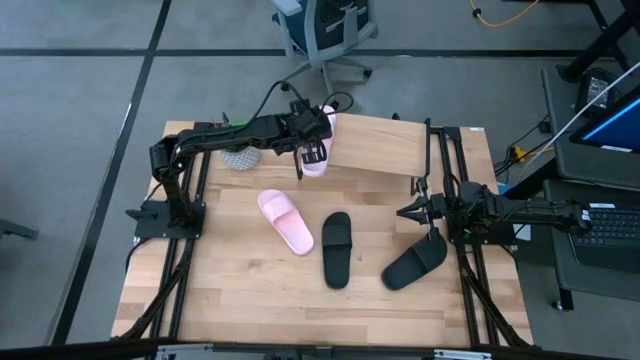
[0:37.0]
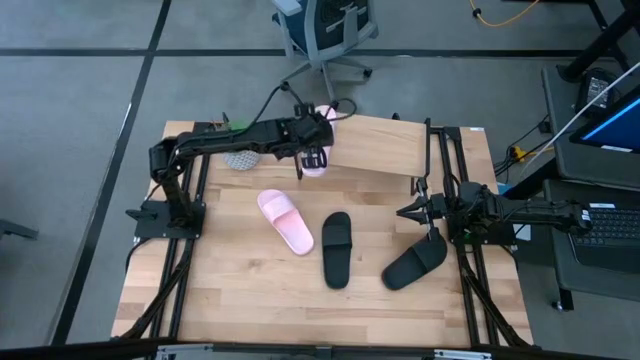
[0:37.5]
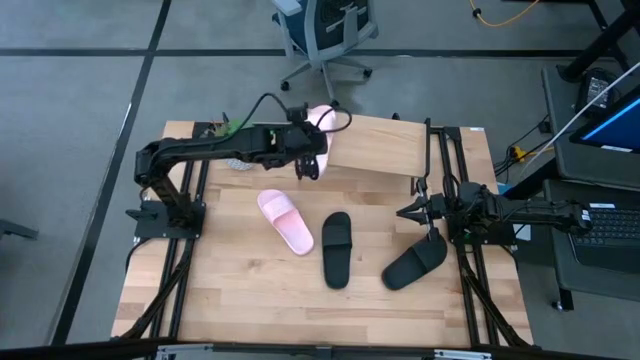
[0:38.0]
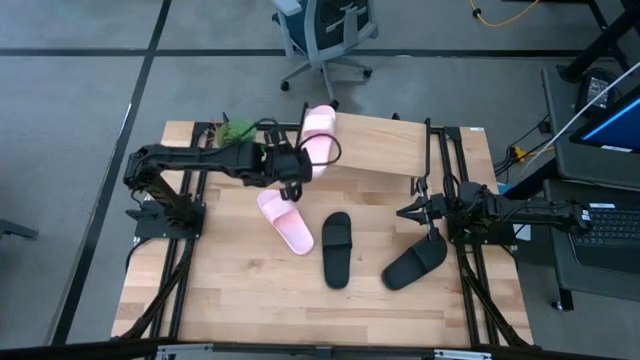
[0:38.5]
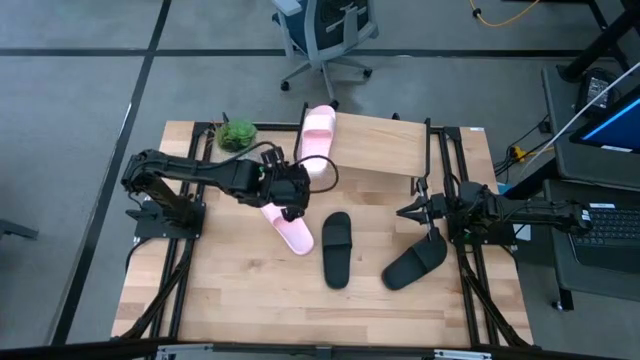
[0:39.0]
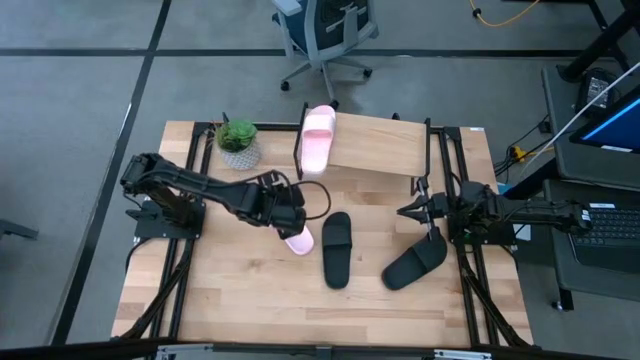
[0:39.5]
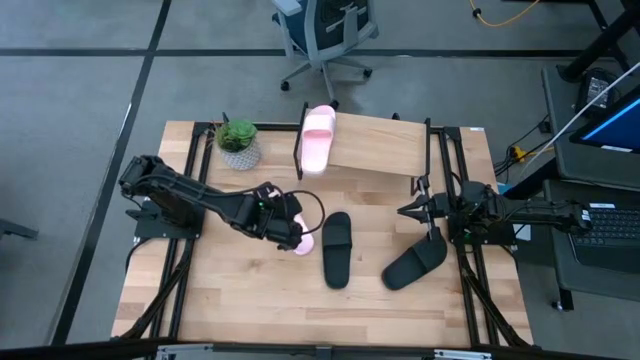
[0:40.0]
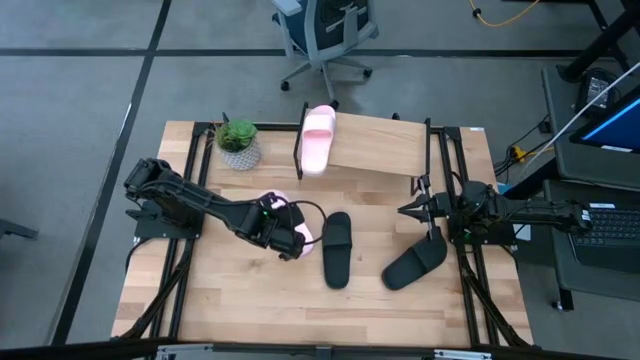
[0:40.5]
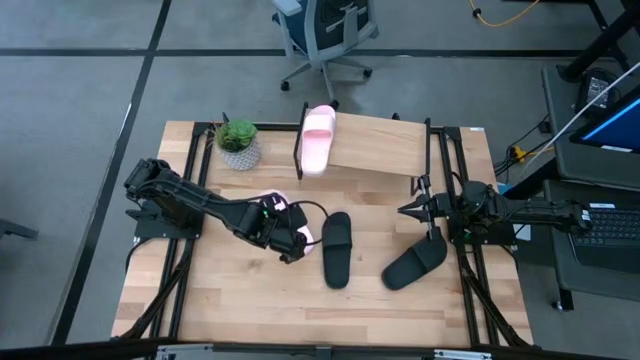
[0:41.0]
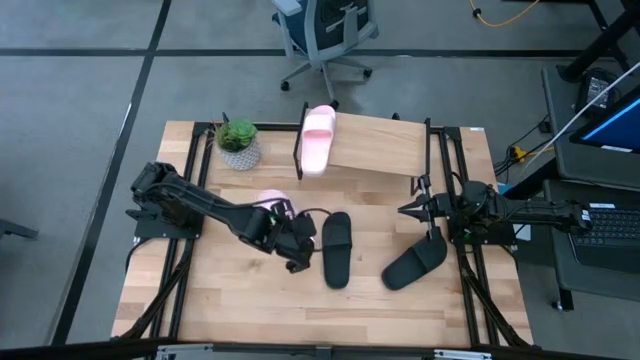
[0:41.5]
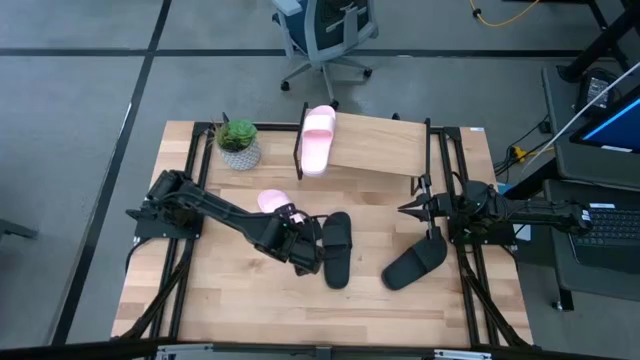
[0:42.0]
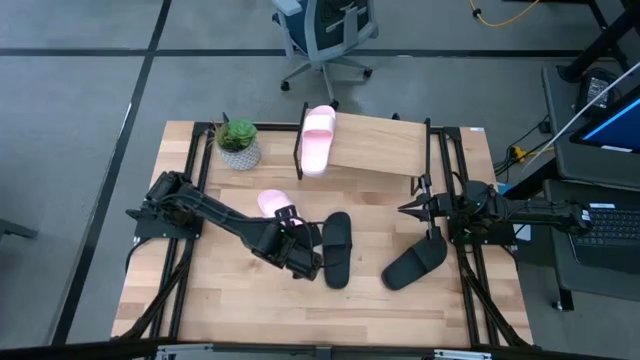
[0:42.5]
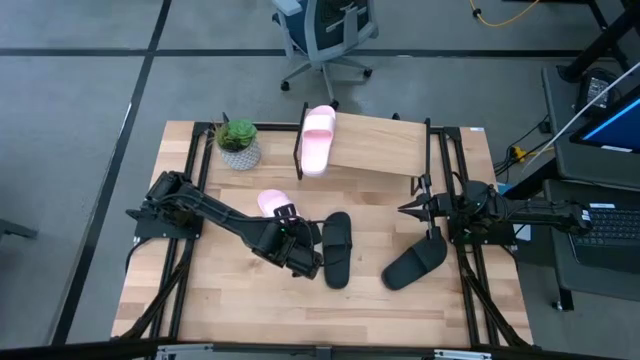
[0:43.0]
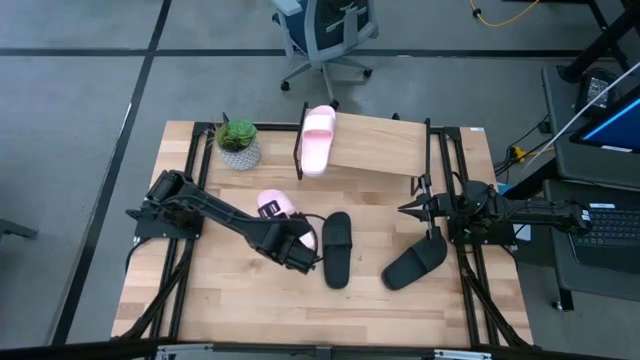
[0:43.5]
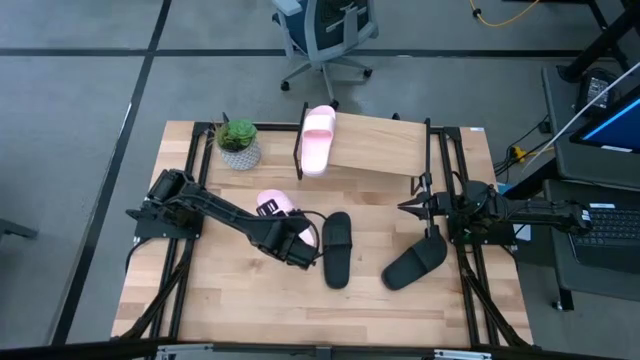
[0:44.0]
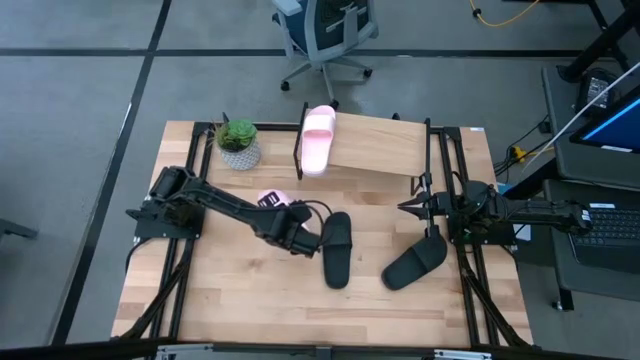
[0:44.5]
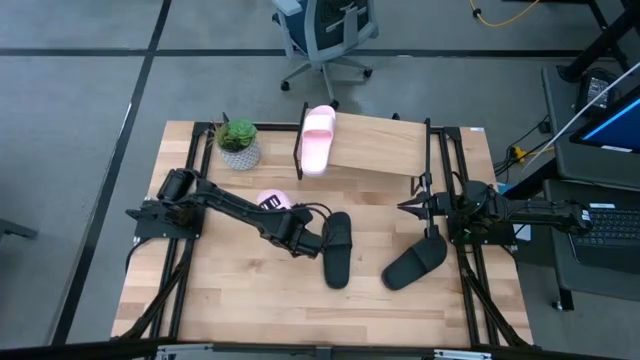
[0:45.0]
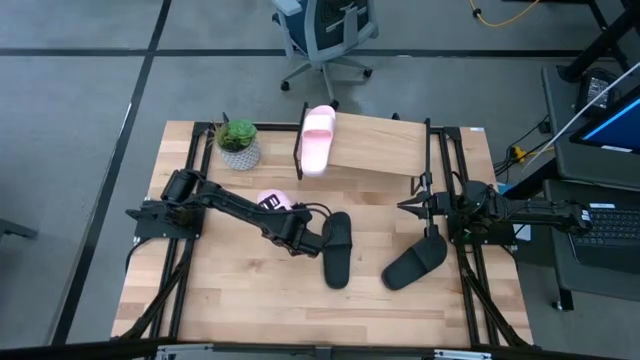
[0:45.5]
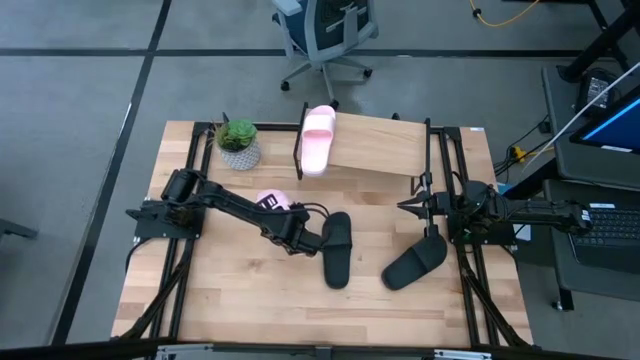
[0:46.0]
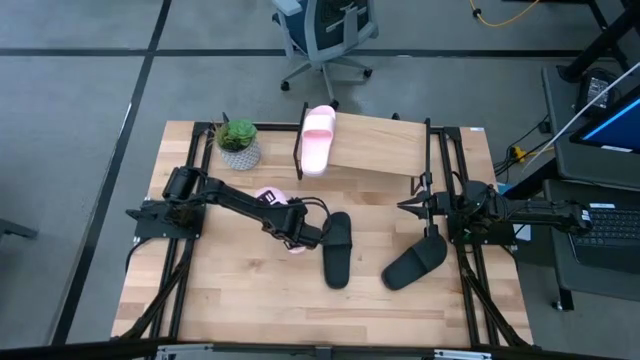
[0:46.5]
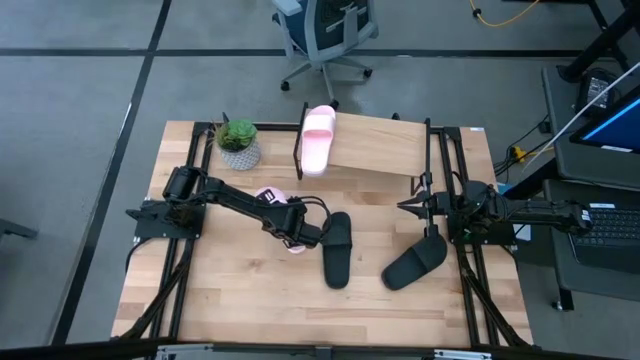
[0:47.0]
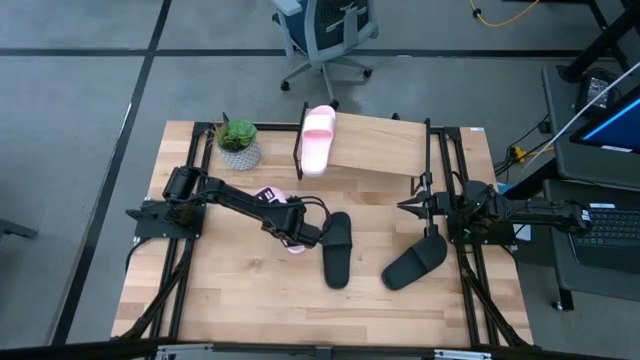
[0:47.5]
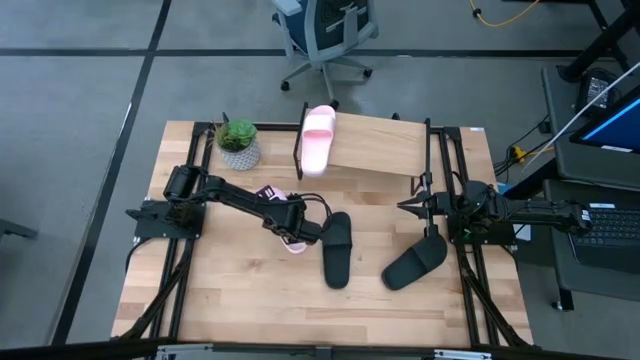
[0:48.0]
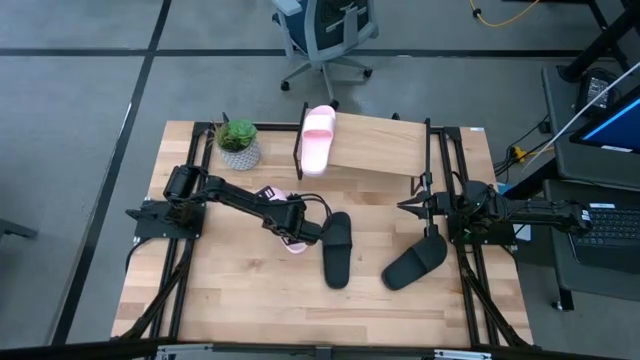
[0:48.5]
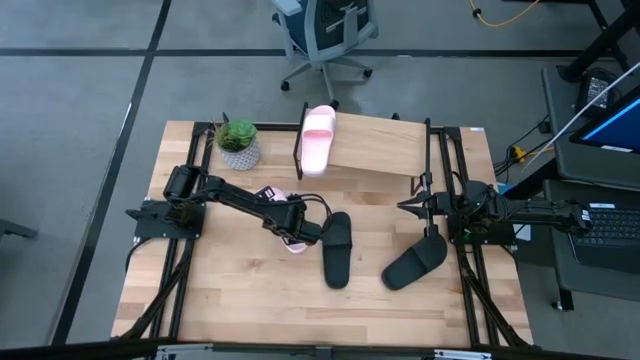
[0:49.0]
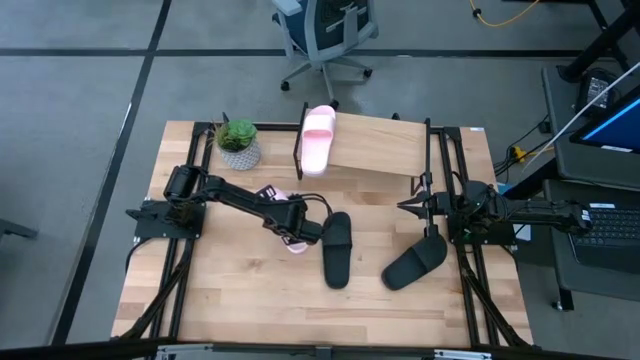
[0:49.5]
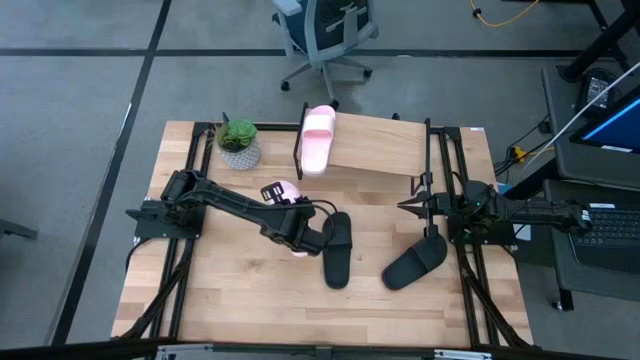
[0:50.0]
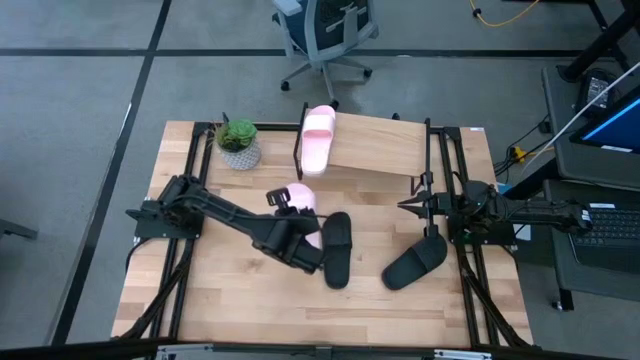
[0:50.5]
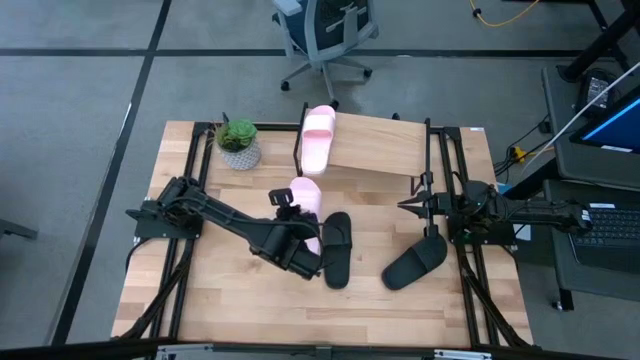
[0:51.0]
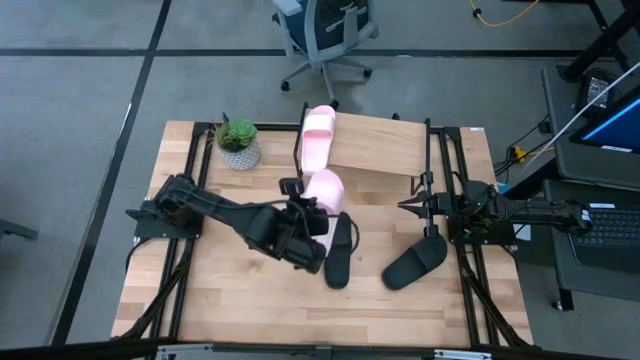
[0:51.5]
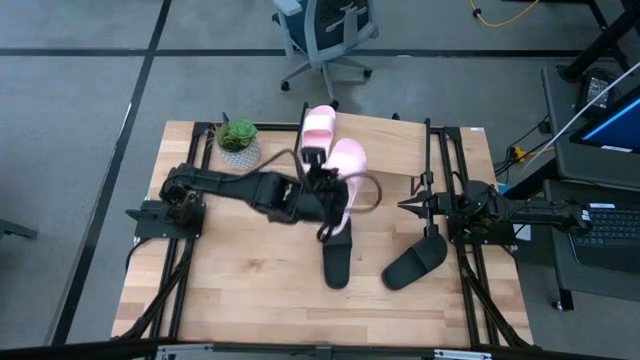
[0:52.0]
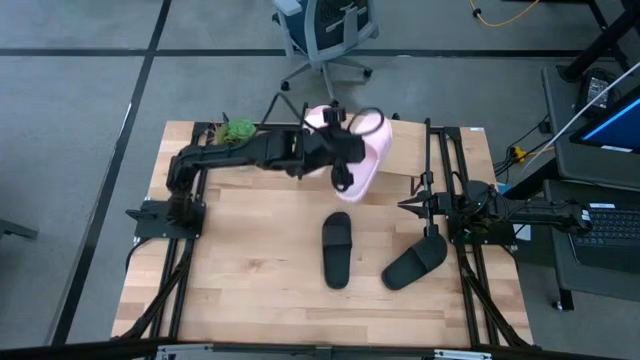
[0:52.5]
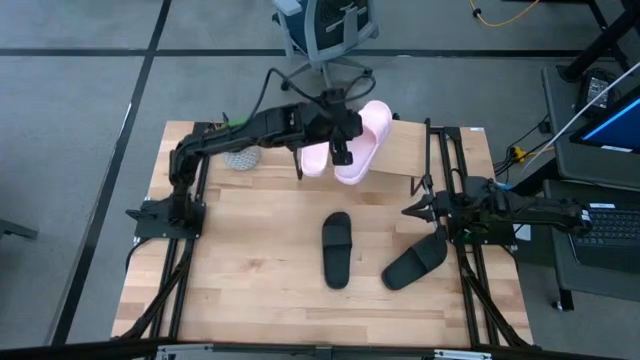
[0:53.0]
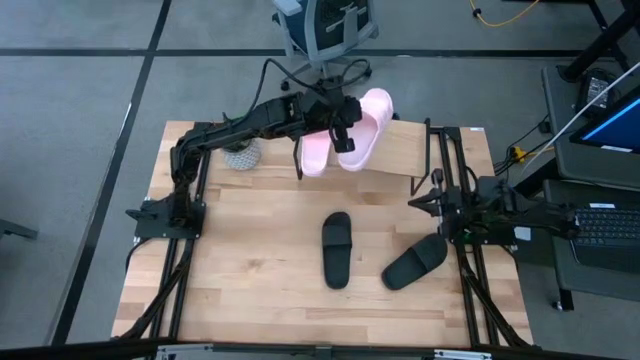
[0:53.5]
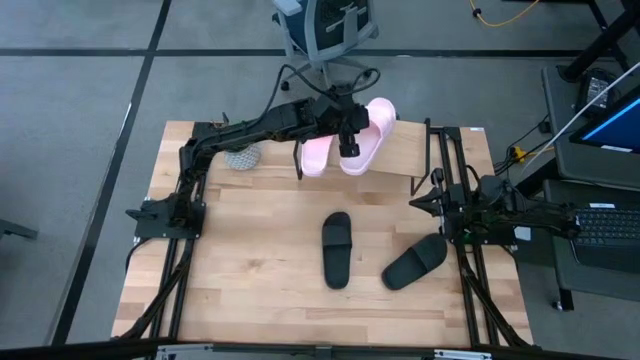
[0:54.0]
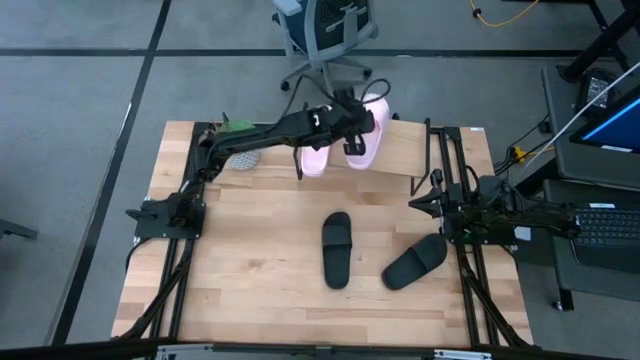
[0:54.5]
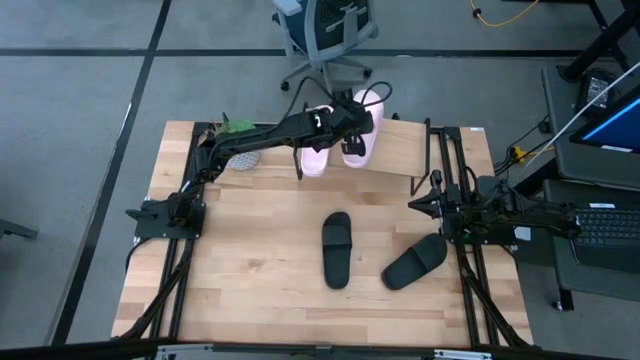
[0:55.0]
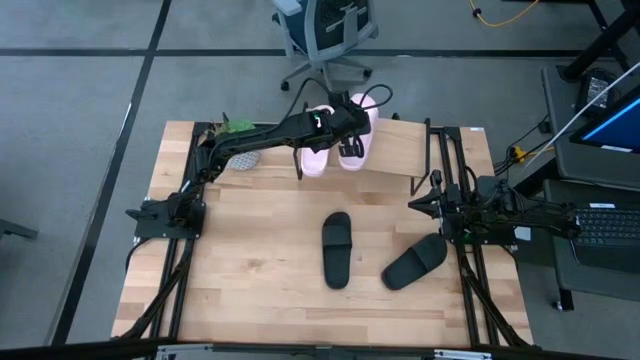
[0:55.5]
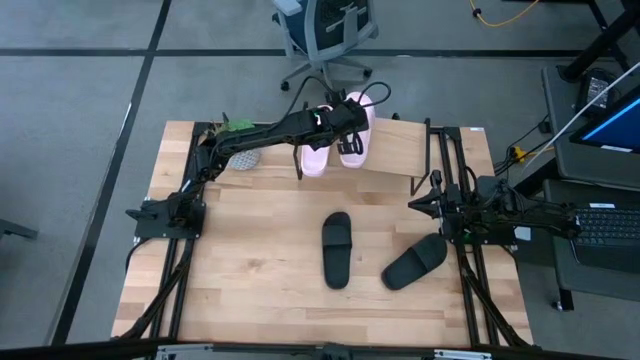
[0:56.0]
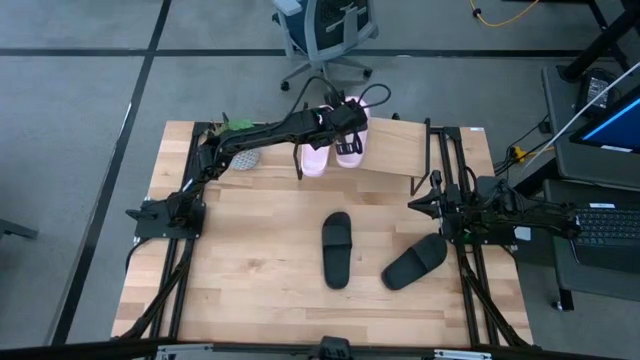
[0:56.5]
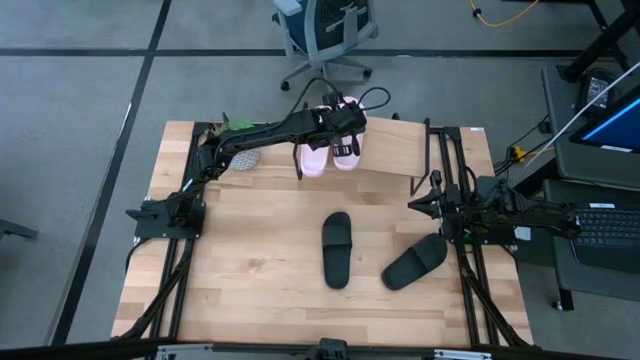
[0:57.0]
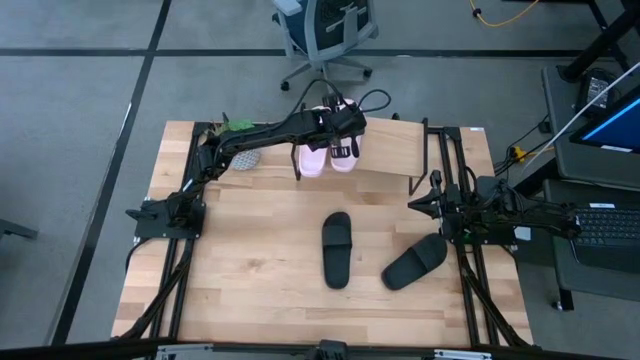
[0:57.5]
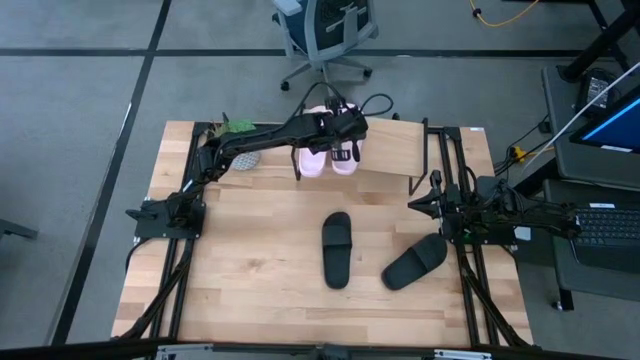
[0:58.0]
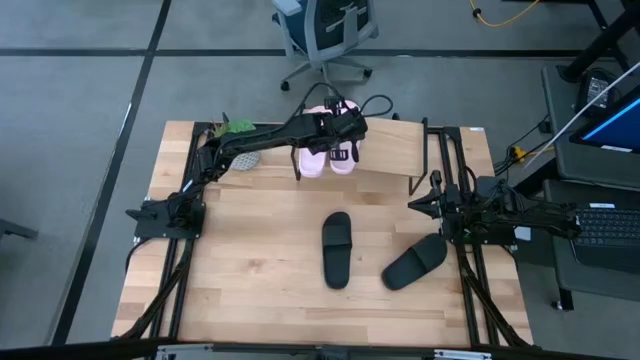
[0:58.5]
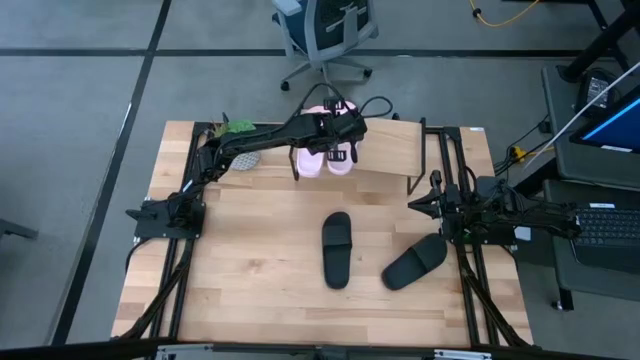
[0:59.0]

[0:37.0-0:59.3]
Task: Pick and place slides into the shelf
Put the pink slide on the shelf
